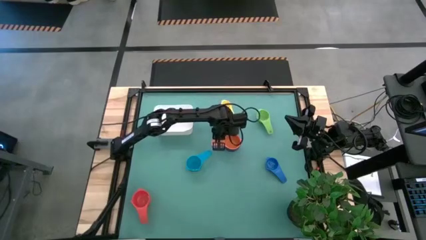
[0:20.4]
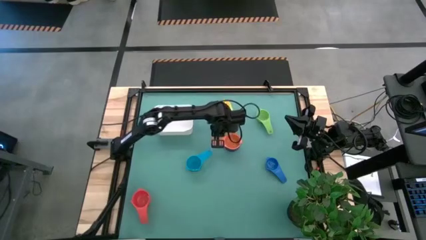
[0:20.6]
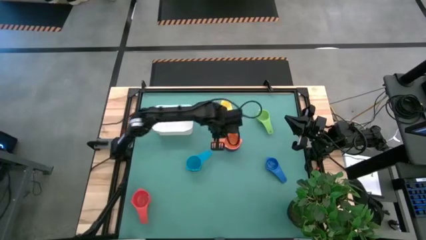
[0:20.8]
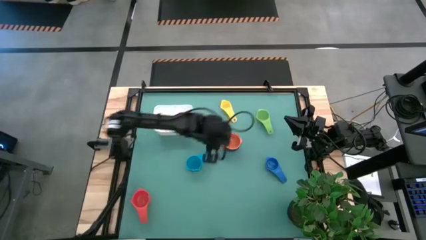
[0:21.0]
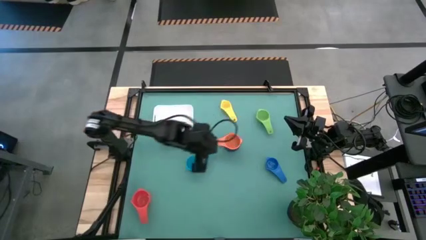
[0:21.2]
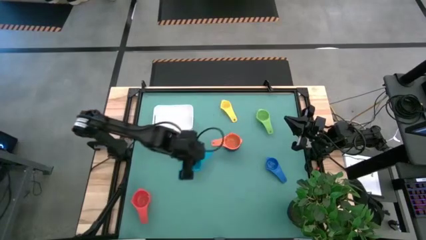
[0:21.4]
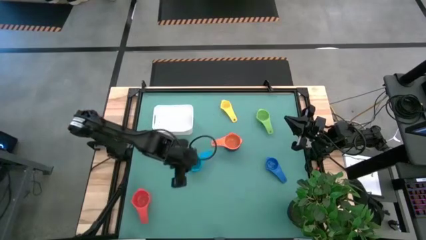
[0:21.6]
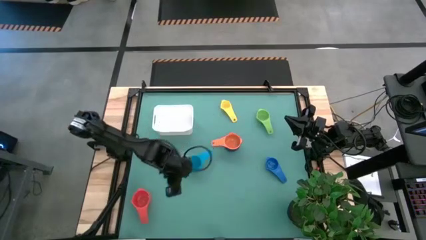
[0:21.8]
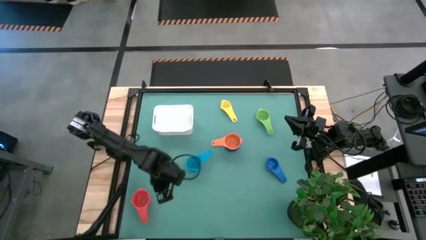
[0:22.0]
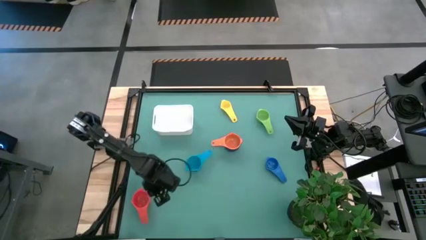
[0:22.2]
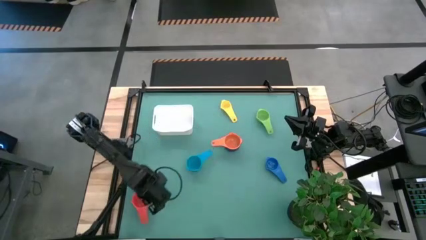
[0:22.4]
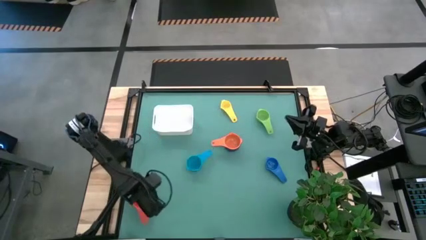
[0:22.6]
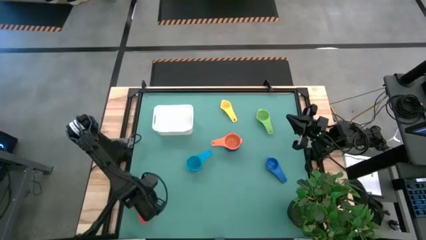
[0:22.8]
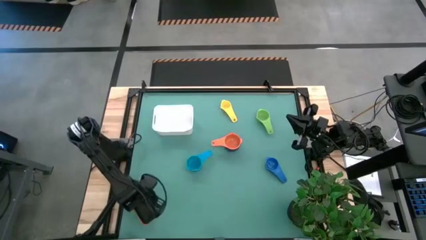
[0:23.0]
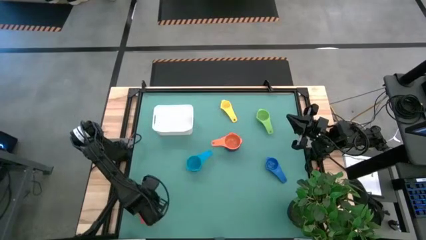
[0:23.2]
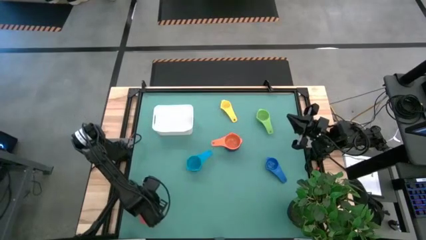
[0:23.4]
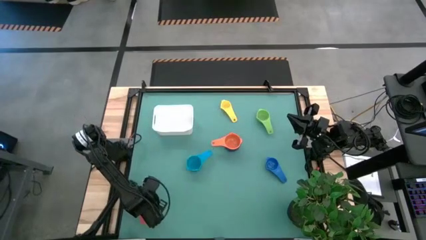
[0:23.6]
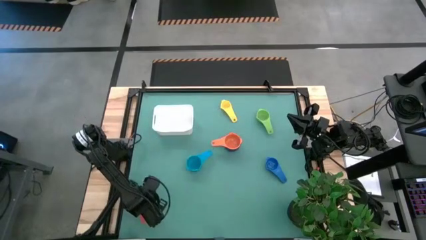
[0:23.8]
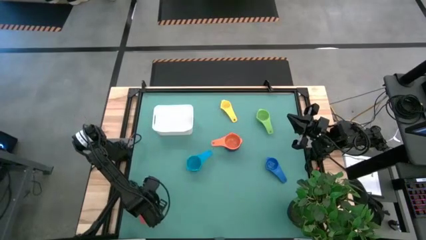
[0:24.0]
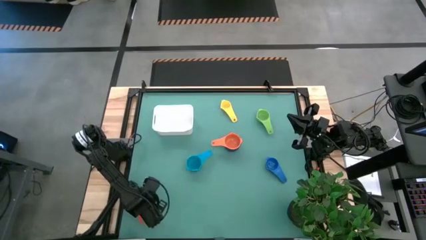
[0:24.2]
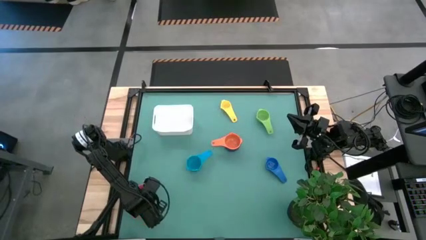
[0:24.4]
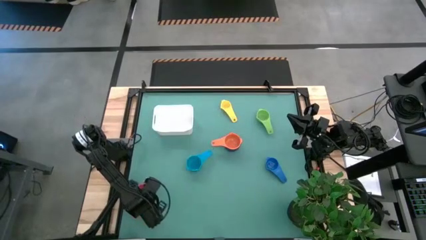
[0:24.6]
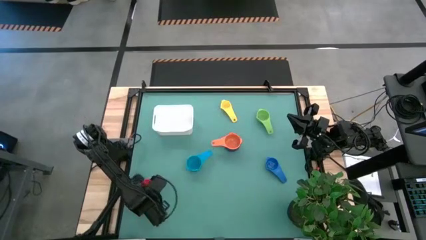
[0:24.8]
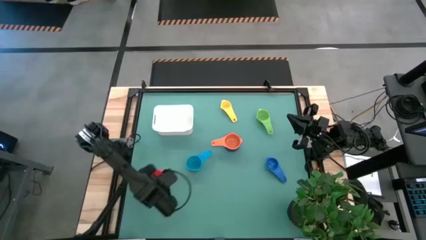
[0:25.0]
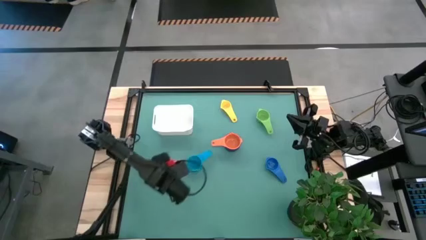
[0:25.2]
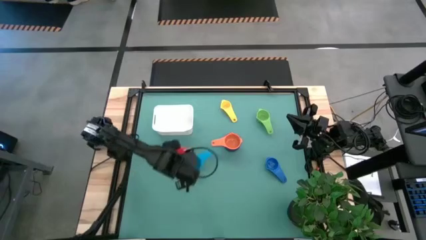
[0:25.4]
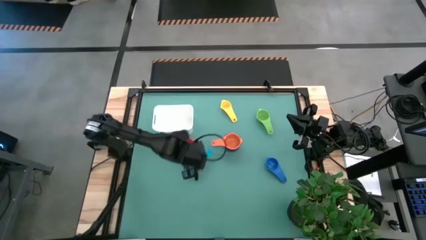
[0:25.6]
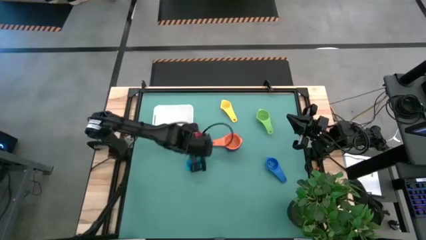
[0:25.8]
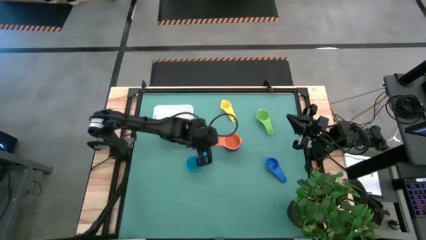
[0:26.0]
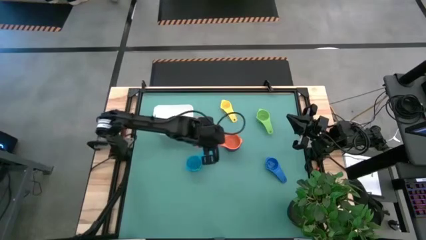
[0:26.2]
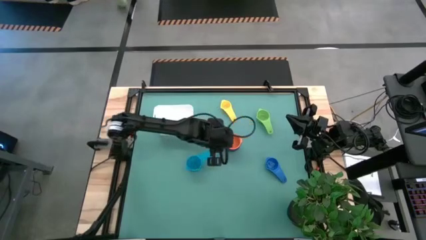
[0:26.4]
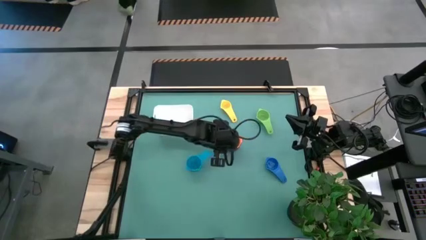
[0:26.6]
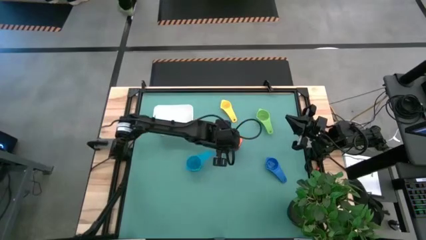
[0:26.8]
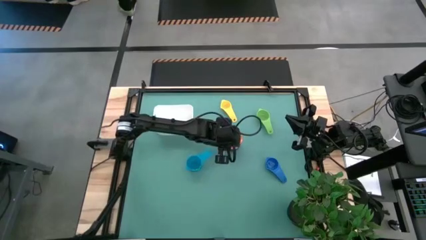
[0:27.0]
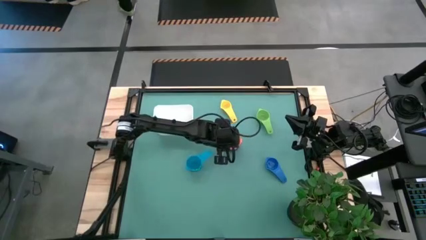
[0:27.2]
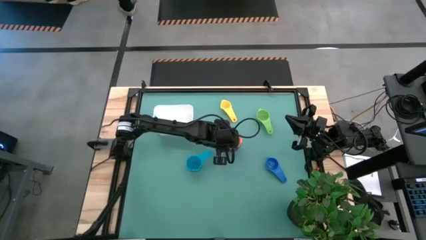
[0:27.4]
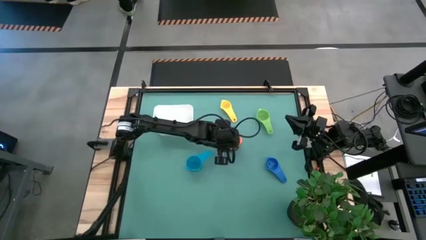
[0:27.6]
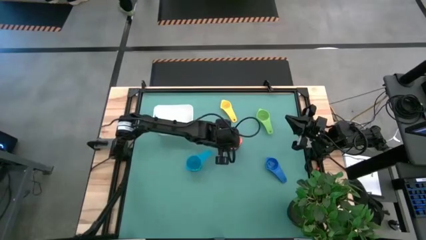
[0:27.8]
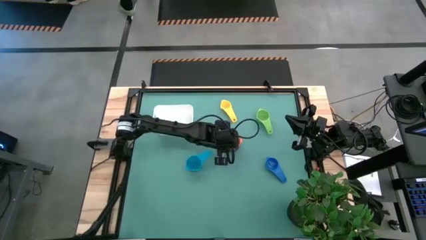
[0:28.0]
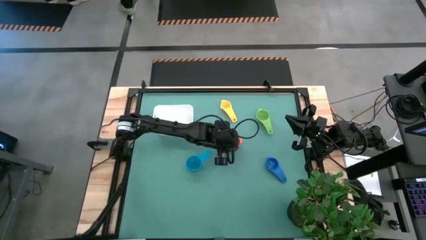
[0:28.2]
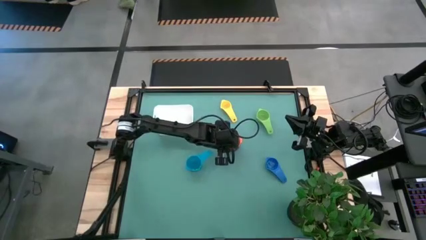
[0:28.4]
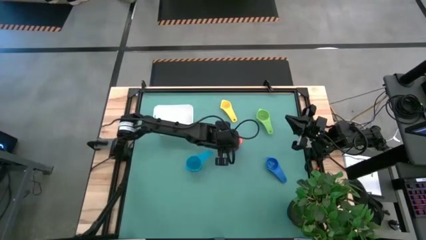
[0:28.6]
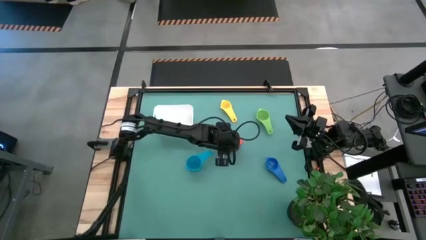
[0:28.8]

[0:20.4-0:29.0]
Task: Nest measuring cups in basket
Stack the red measuring cup on top of the orange measuring cup

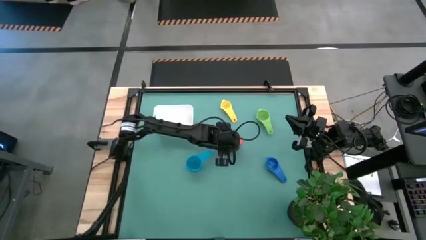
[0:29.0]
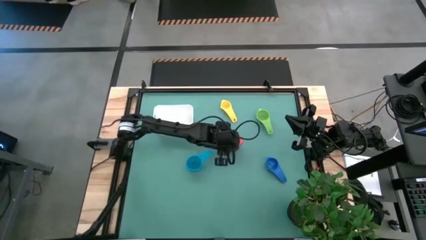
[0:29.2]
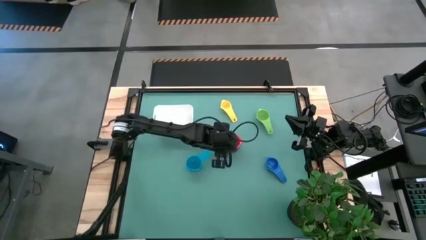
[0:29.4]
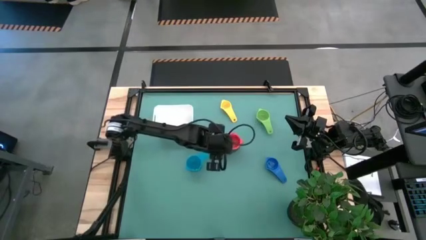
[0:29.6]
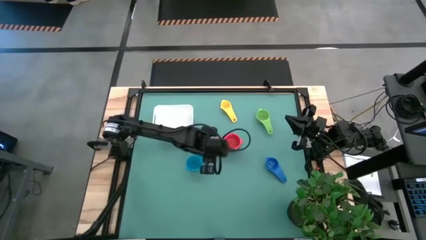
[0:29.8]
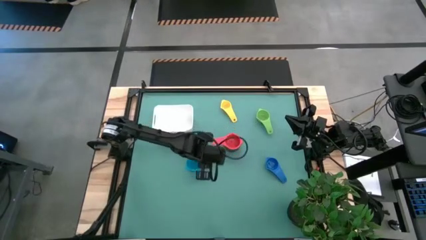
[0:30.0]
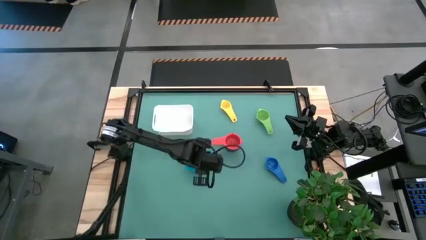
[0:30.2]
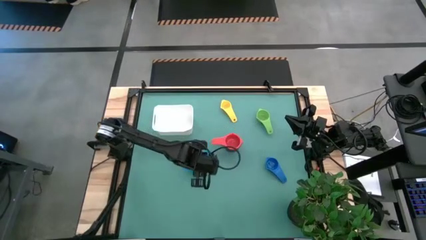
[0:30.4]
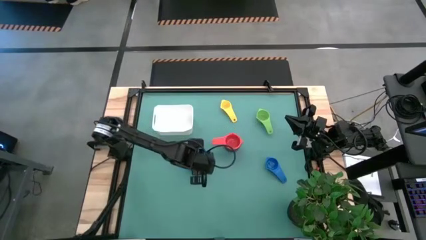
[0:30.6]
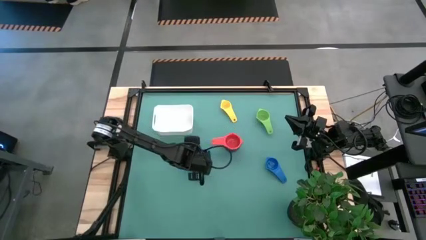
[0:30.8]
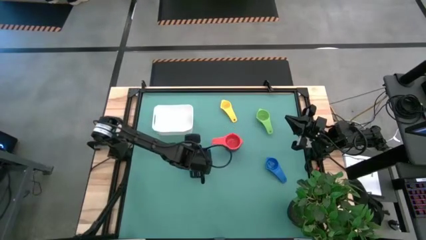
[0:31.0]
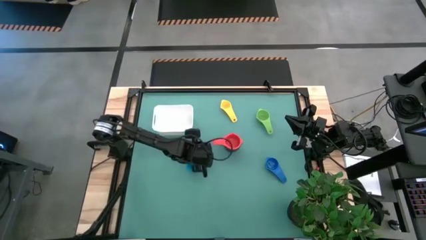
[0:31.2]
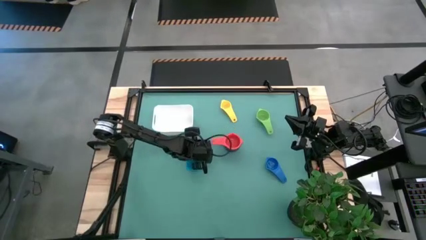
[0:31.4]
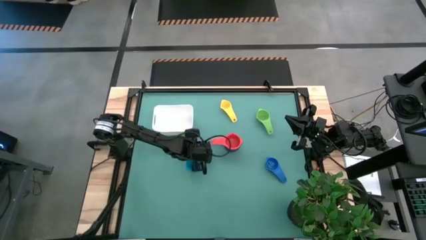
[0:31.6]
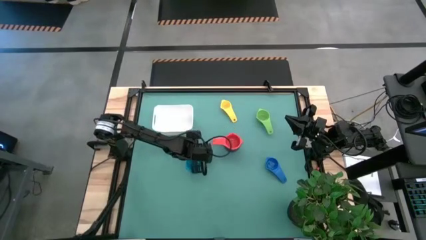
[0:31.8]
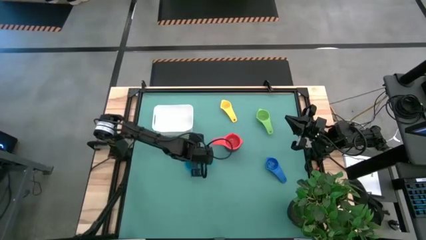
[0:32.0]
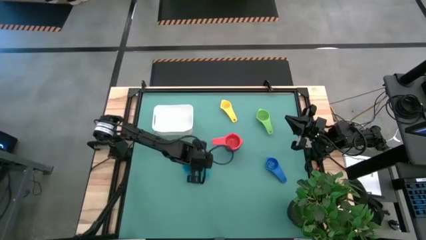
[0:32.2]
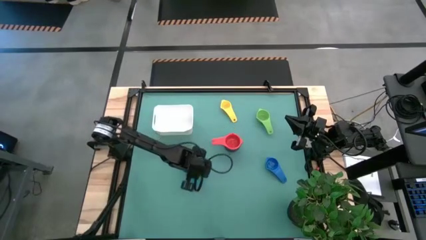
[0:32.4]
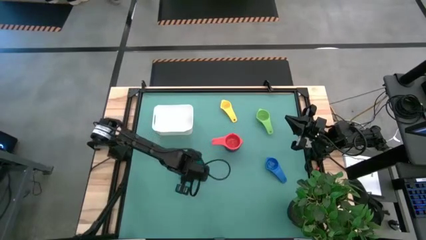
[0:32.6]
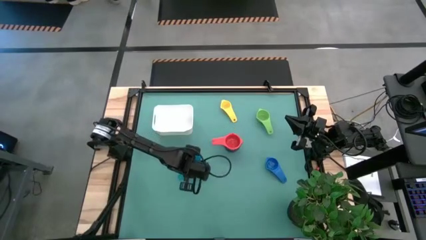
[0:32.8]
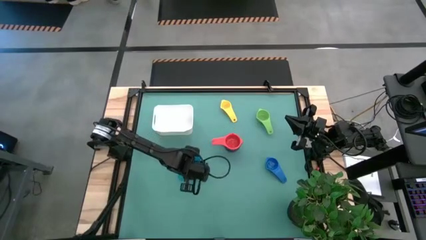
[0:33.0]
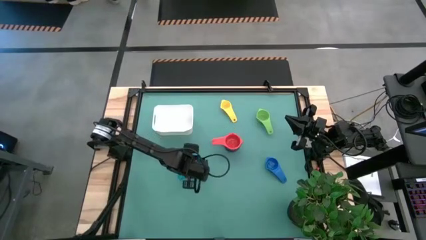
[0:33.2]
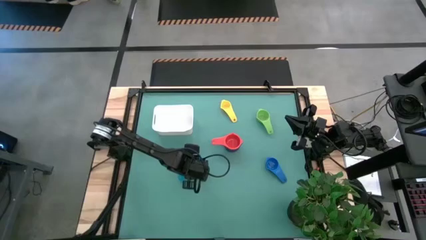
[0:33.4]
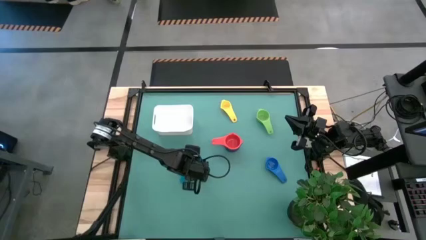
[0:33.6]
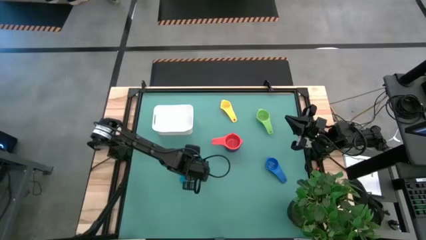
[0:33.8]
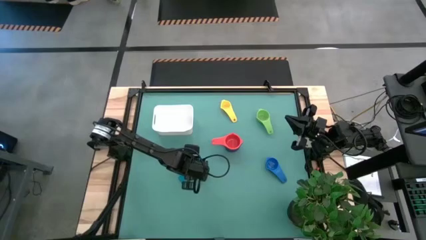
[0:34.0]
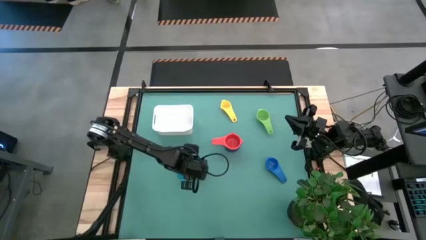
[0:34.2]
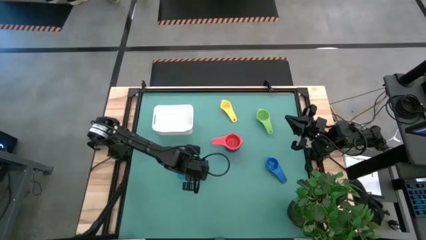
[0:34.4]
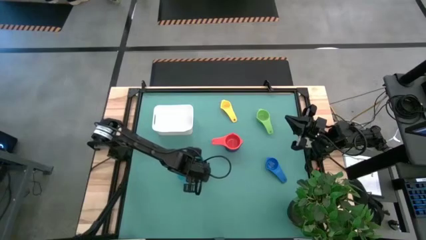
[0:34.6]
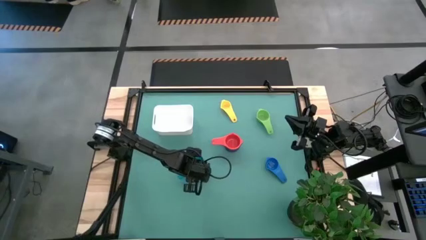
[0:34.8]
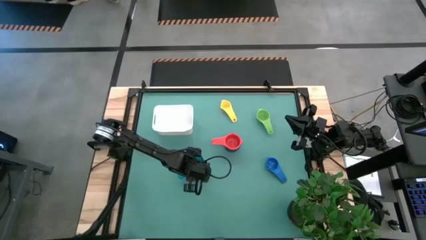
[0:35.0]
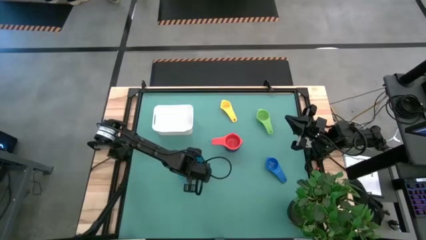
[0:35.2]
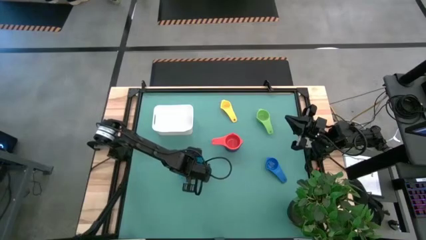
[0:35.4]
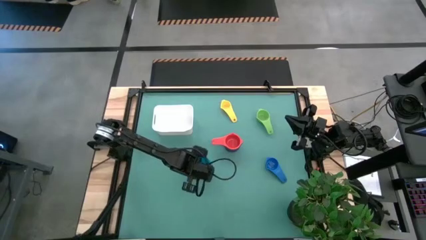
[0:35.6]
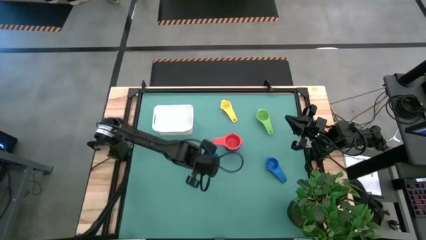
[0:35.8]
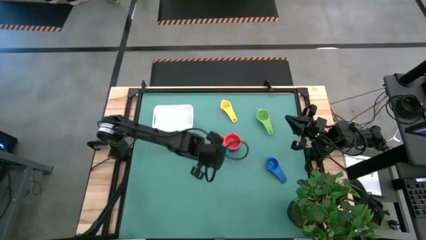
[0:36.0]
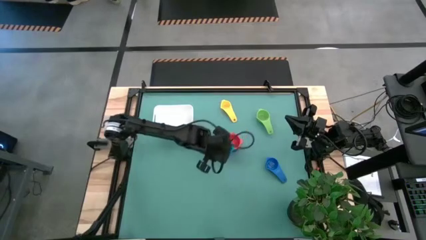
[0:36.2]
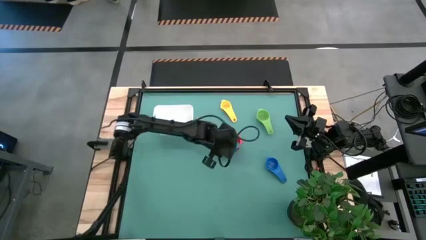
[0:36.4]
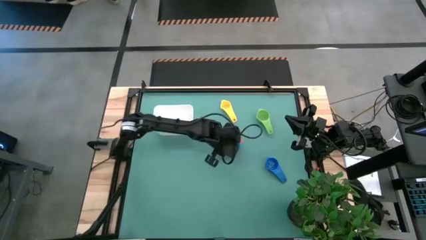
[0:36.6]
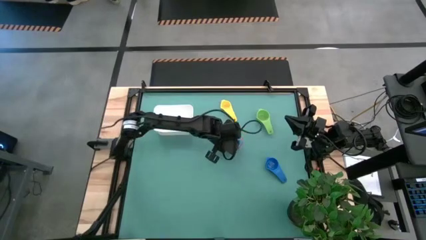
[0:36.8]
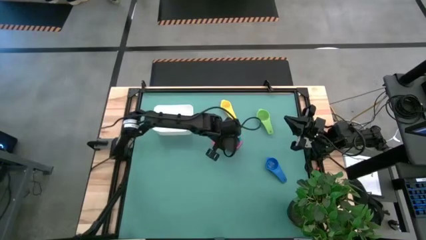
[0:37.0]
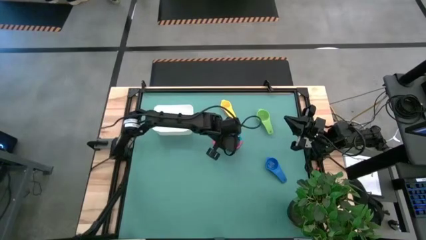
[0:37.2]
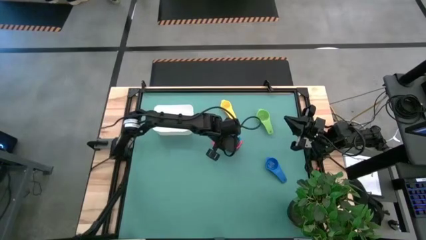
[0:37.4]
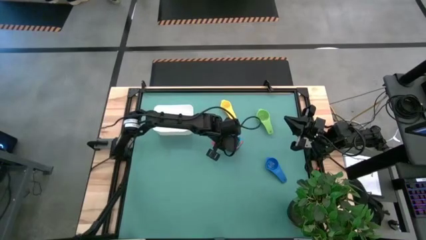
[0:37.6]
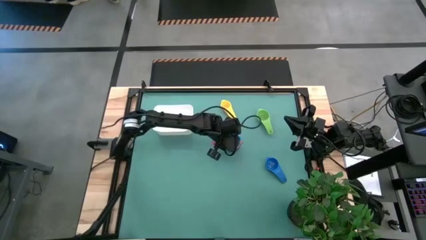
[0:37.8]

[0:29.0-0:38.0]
Stack the light blue measuring cup on top of the red measuring cup
